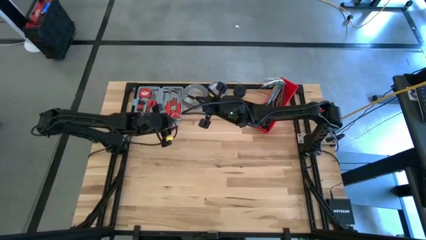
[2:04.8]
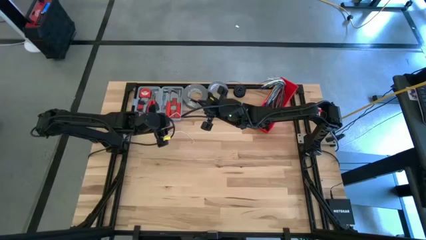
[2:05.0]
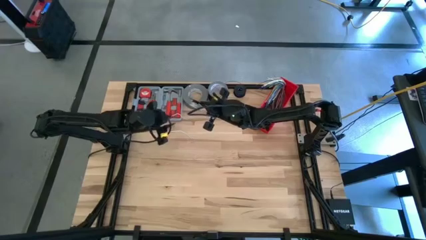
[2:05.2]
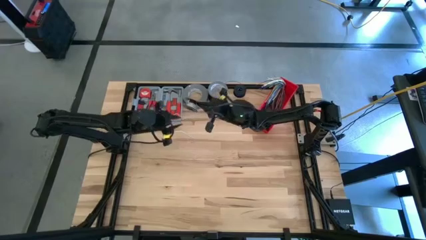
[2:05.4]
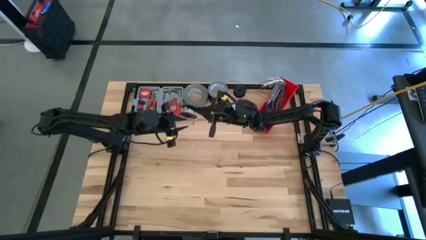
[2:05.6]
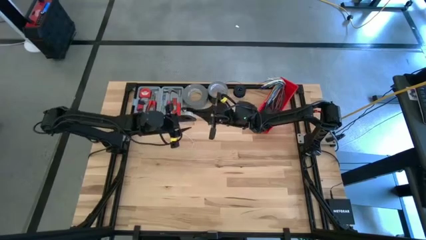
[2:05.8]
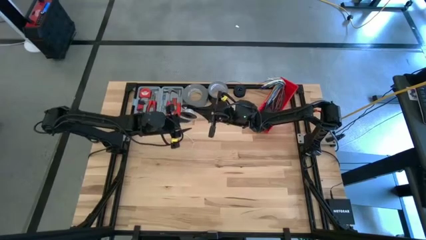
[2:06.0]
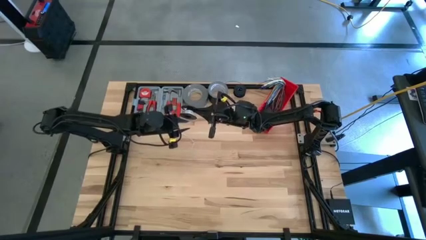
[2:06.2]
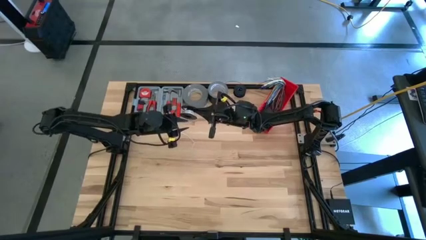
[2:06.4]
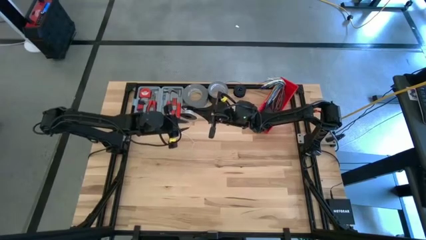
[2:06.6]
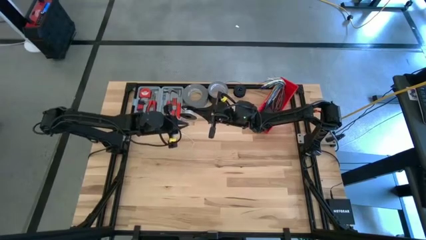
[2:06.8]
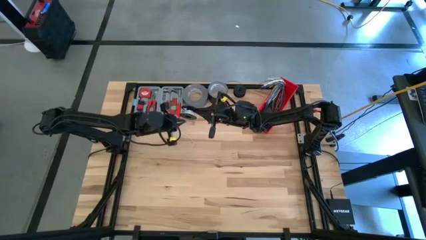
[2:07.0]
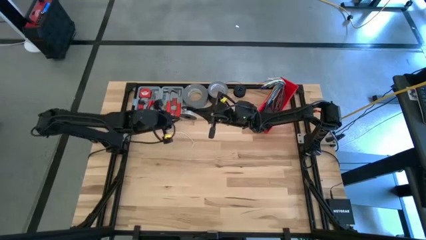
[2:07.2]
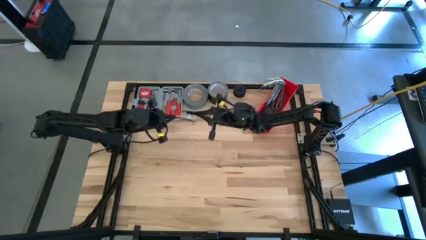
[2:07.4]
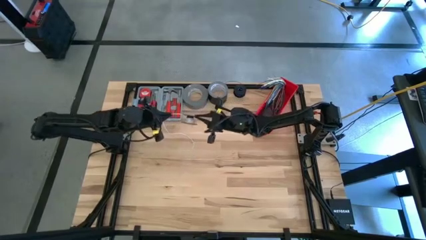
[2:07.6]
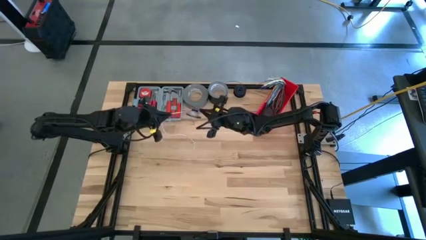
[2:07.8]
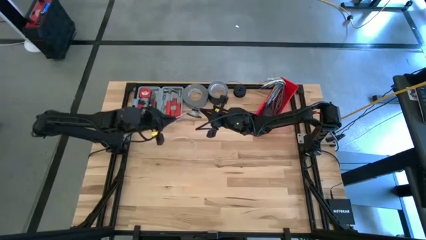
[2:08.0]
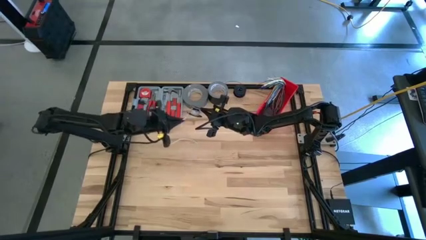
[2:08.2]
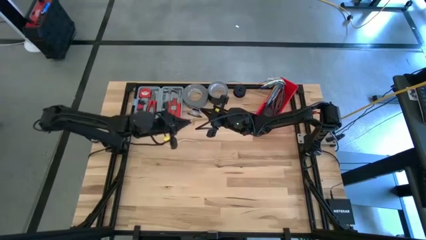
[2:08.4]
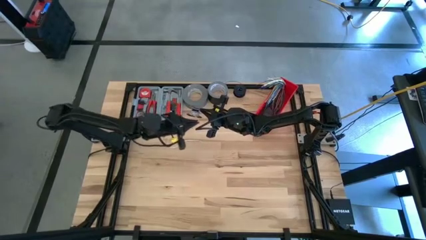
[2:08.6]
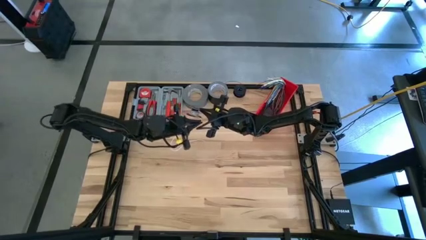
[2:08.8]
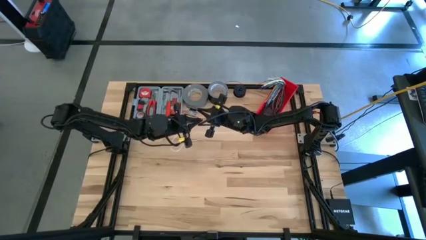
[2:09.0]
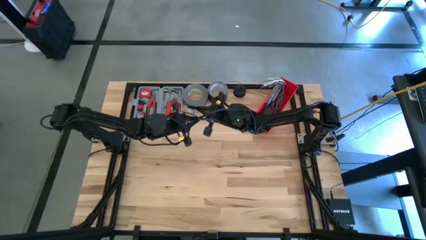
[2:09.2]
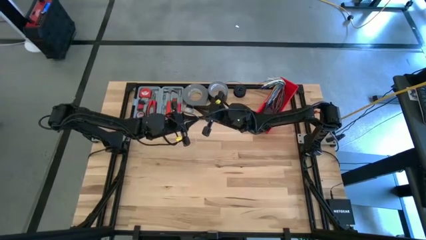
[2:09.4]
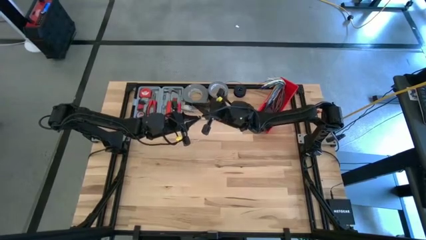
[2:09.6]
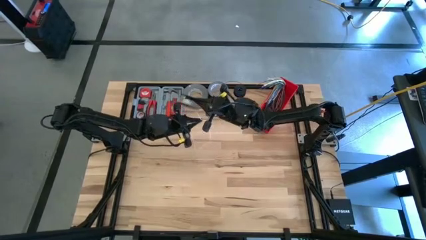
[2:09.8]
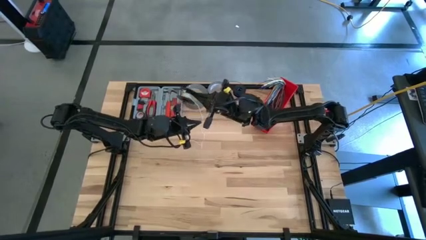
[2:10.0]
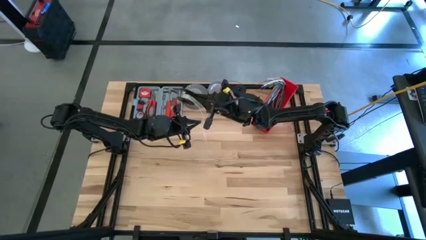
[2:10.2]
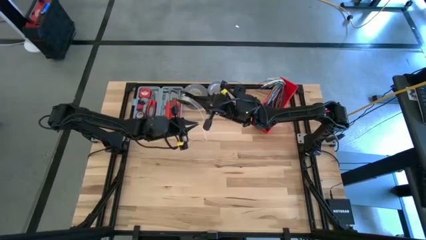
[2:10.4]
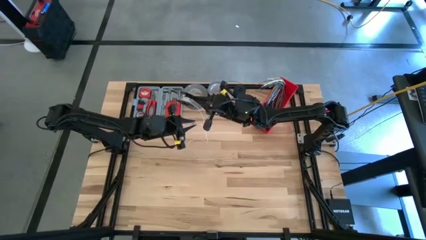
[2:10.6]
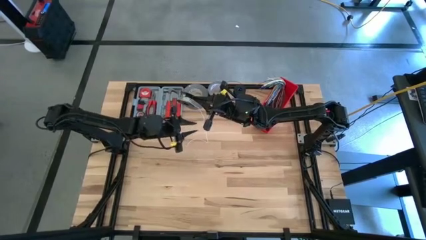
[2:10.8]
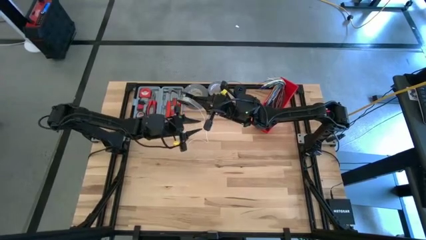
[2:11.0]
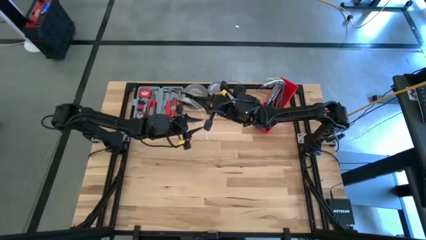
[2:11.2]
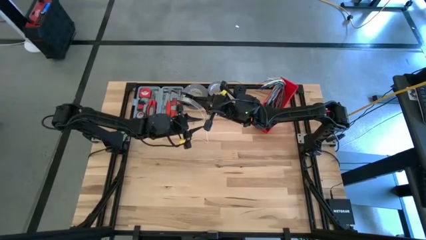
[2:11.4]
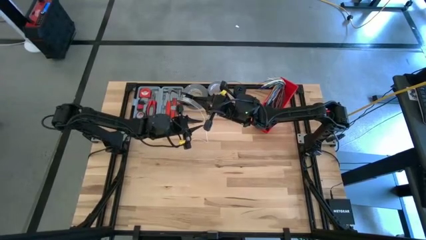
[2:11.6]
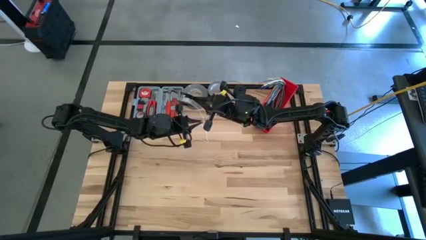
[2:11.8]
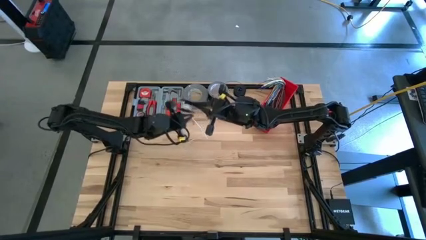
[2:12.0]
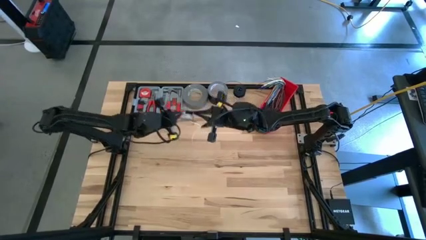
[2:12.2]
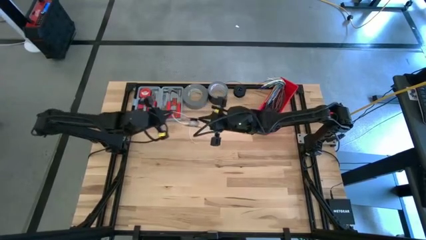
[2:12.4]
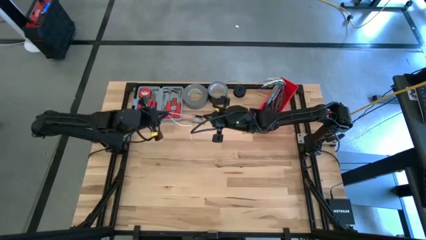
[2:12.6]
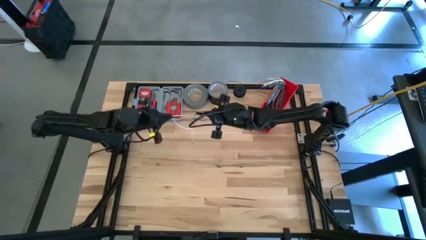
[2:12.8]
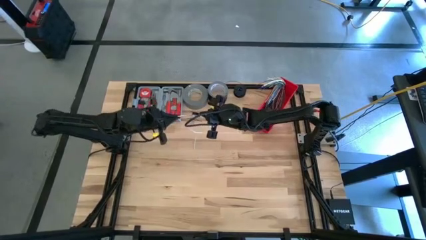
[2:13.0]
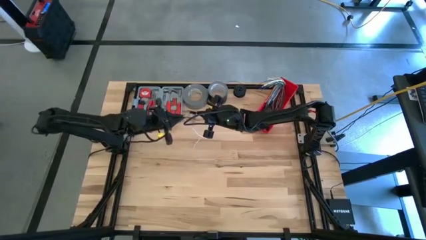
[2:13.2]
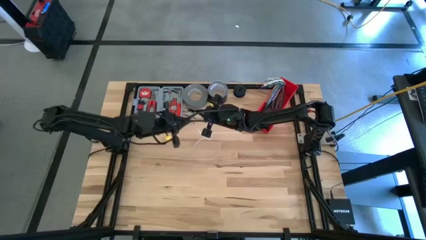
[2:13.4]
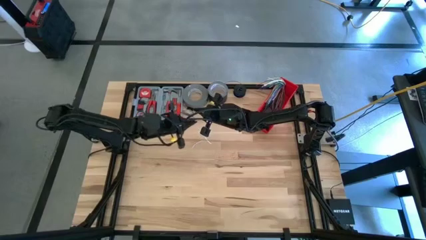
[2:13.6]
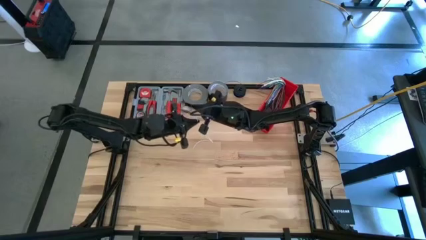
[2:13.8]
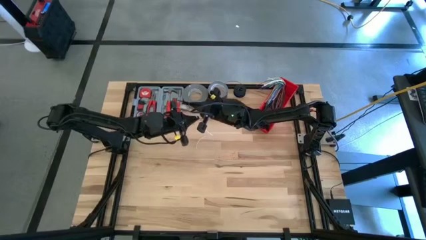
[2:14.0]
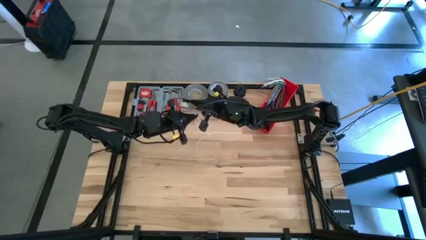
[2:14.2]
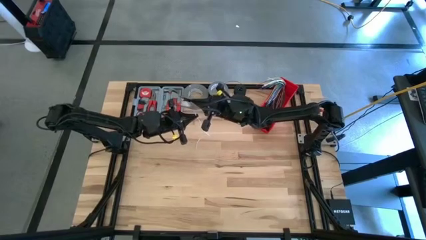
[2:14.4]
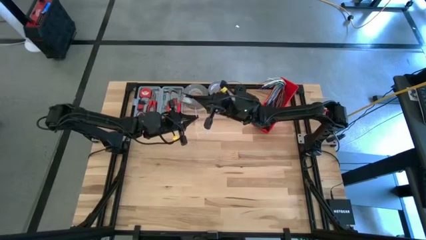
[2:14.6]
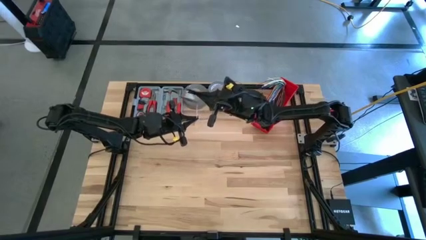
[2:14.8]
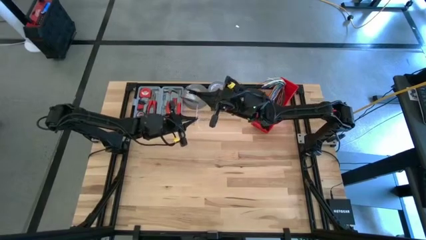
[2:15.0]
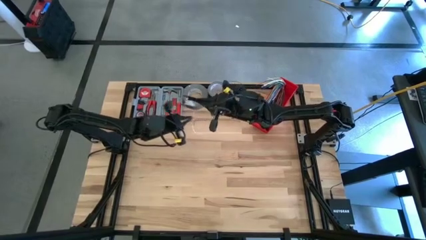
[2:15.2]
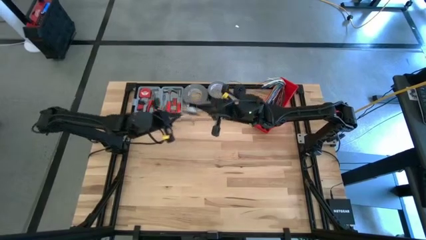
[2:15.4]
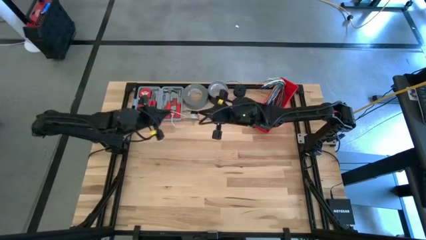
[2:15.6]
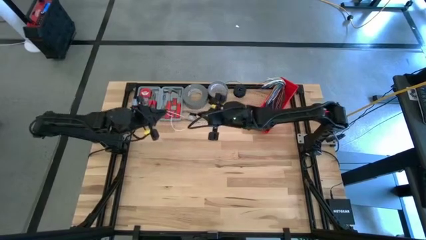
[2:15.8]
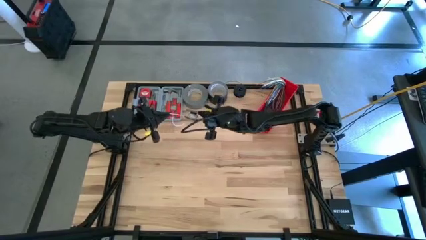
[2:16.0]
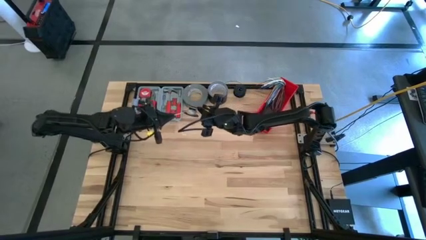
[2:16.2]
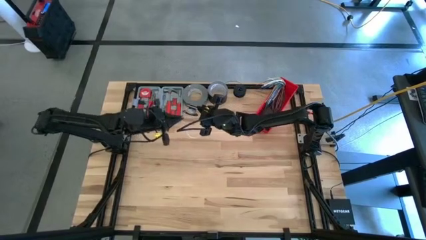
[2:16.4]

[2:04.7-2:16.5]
Task: Coil cords
Coil the white wire onto the black spool
